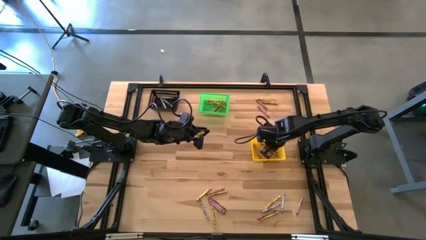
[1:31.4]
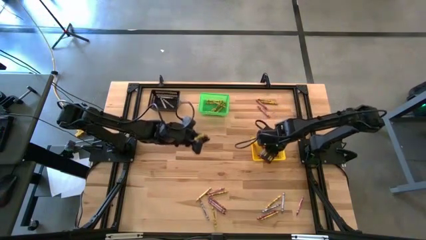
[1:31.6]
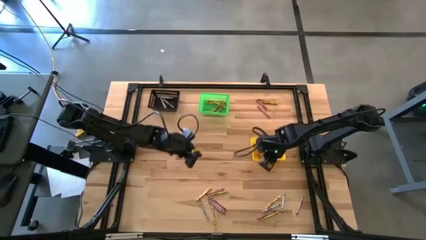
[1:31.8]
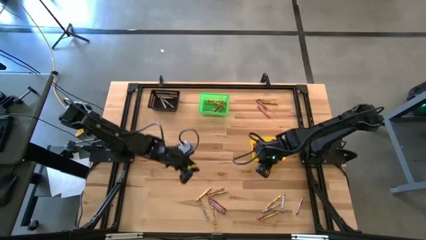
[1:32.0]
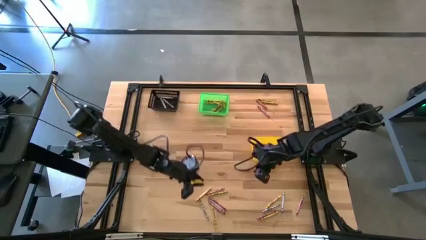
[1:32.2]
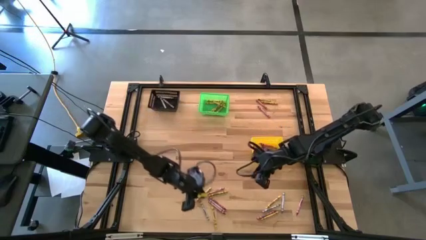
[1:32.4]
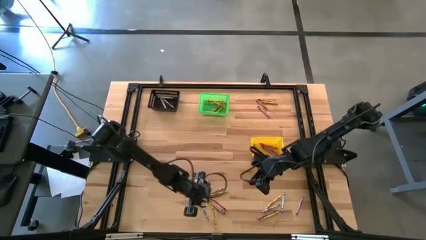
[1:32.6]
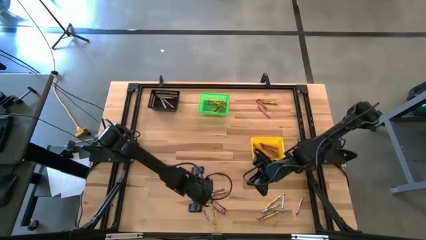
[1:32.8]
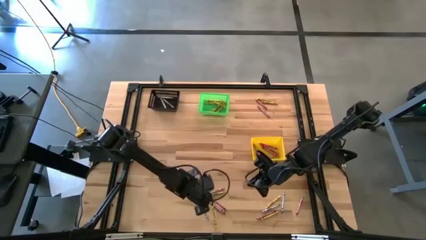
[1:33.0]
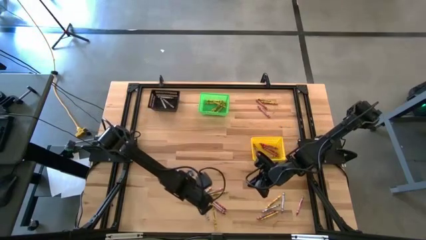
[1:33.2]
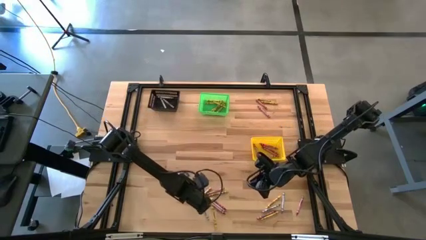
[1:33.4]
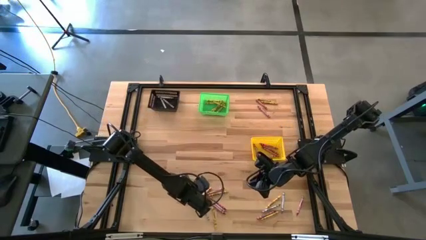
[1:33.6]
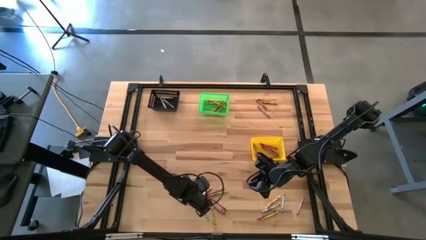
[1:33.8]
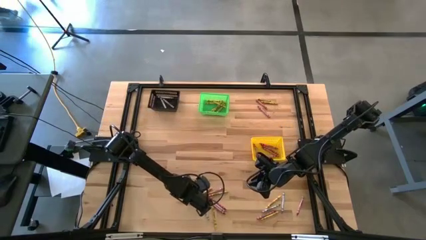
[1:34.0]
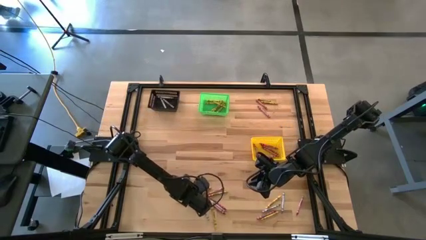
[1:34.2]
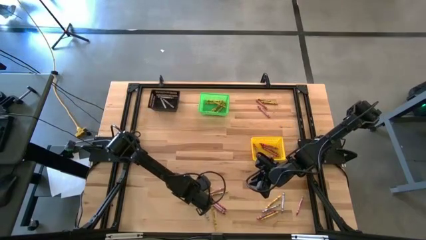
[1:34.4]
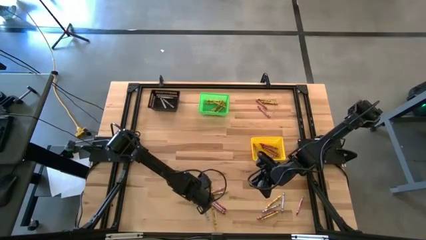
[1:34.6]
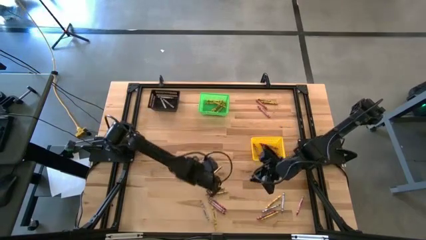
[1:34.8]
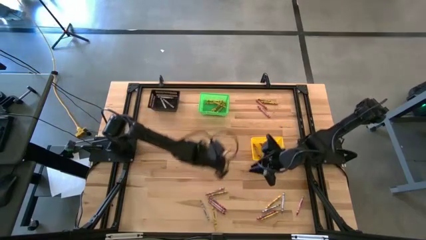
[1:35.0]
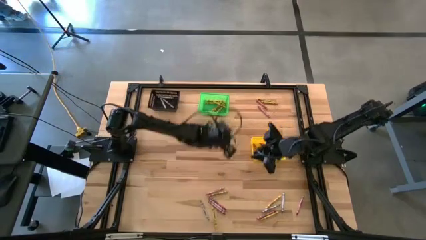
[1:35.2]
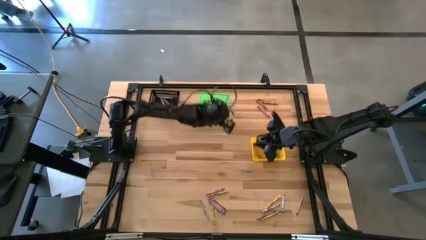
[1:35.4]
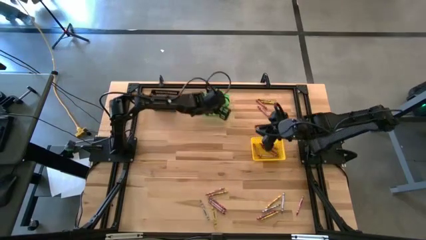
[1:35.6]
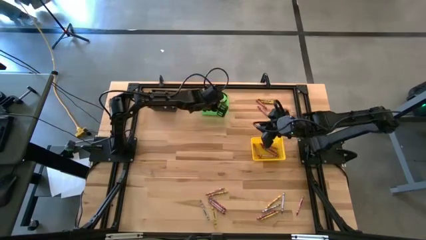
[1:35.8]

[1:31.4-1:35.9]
Task: Sort crayons
Put the yellow crayon into the green basket

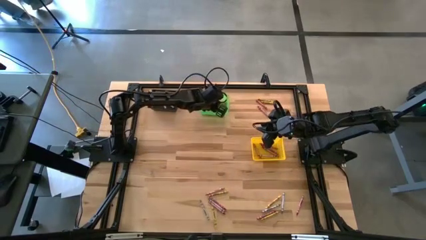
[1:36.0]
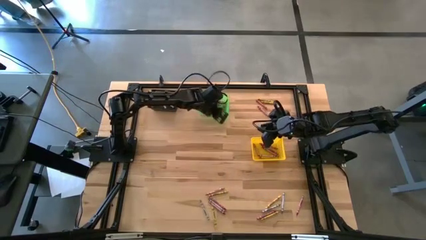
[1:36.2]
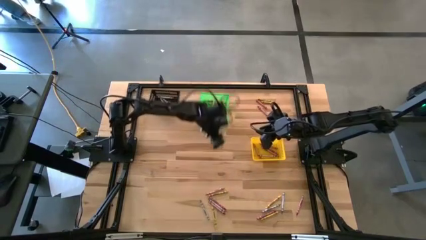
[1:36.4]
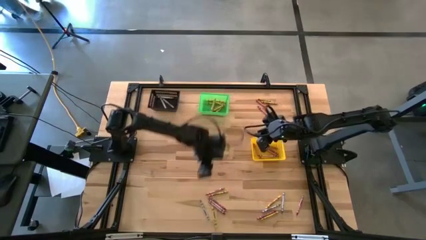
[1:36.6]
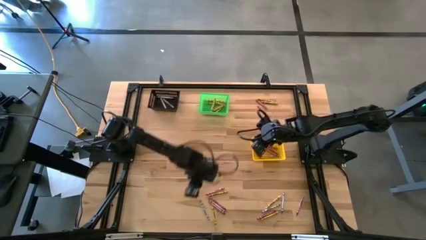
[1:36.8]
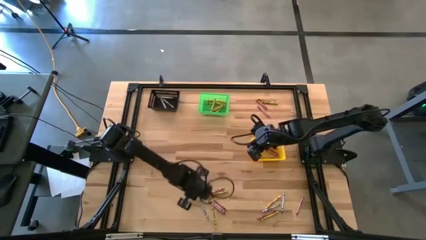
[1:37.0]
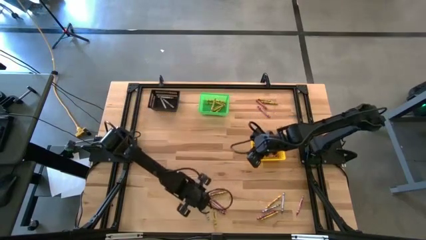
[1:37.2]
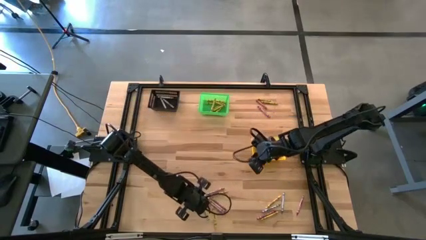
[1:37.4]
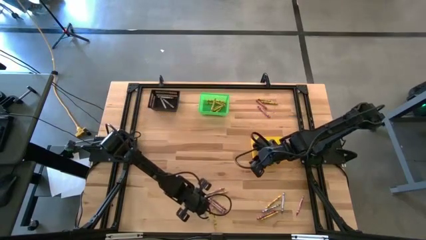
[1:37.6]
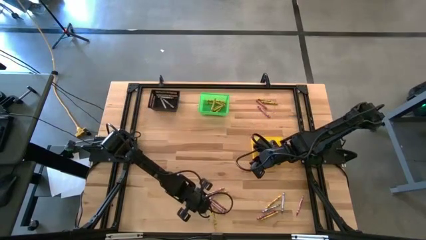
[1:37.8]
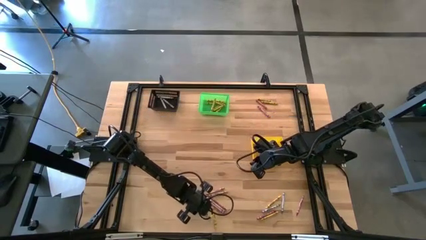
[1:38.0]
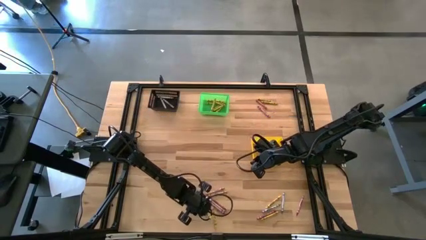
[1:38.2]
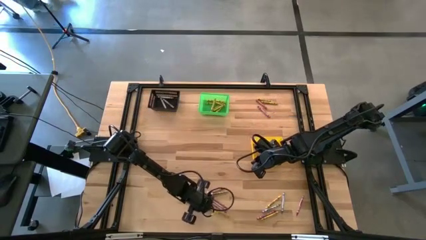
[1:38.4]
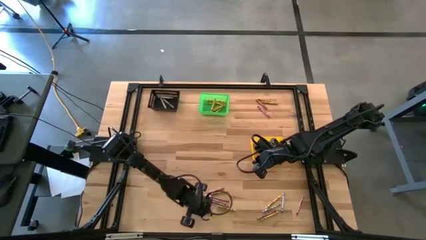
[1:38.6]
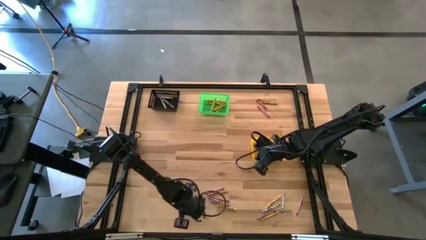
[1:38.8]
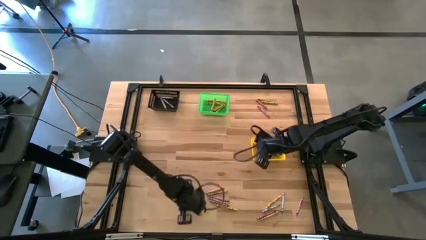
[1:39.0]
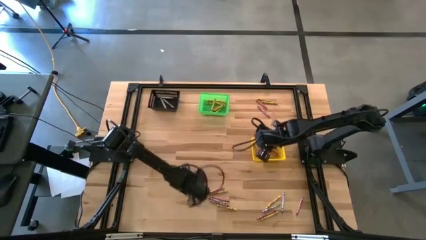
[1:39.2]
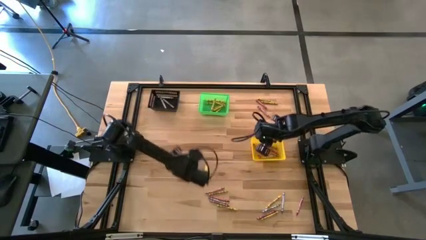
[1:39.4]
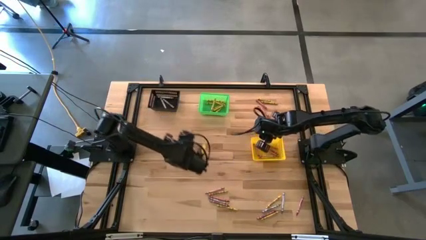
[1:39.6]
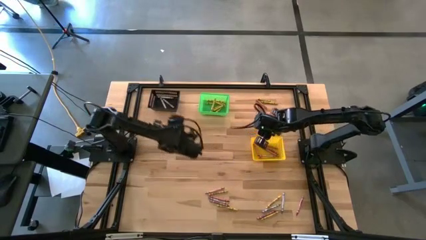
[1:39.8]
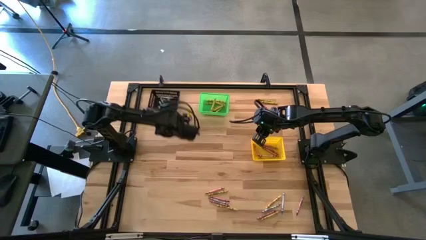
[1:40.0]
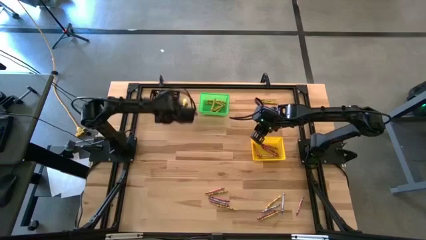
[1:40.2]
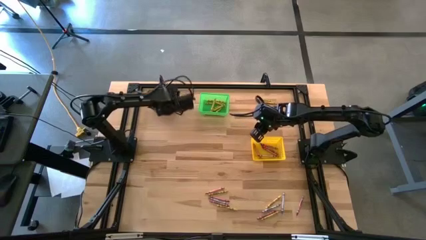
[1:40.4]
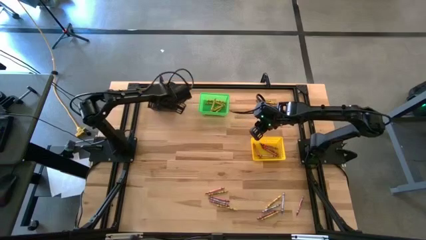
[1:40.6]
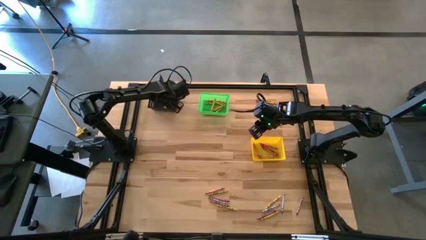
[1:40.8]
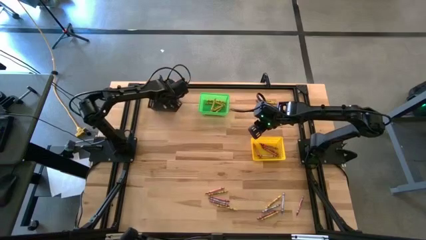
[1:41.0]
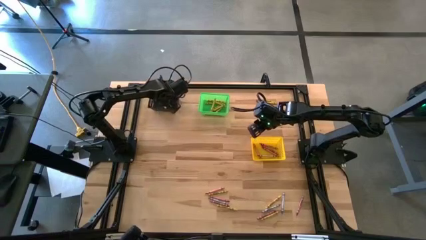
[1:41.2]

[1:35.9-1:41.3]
Put the gray crayon into the black basket

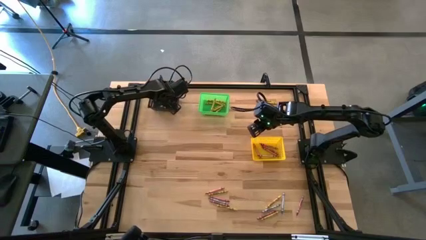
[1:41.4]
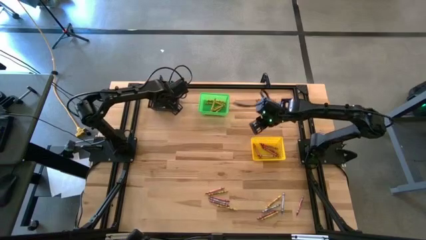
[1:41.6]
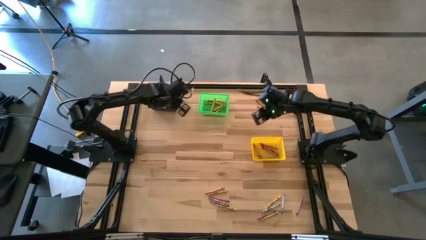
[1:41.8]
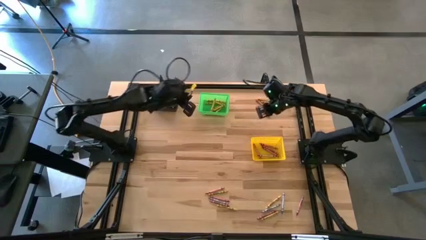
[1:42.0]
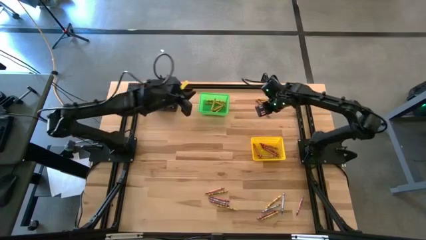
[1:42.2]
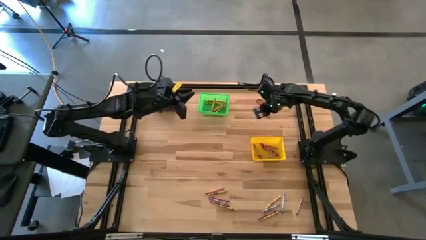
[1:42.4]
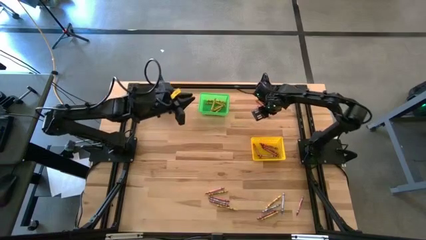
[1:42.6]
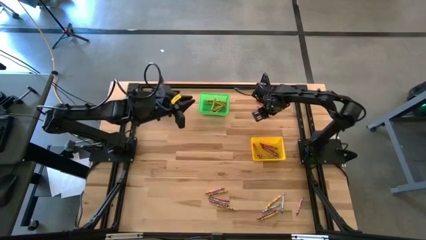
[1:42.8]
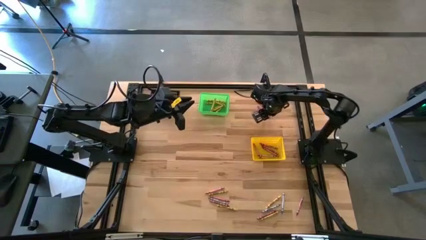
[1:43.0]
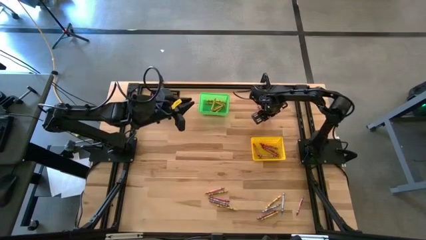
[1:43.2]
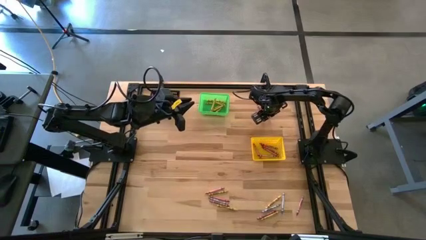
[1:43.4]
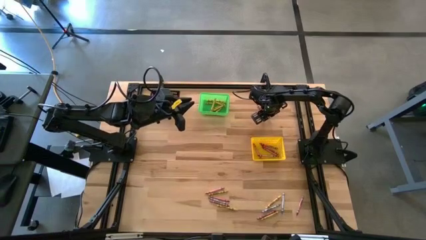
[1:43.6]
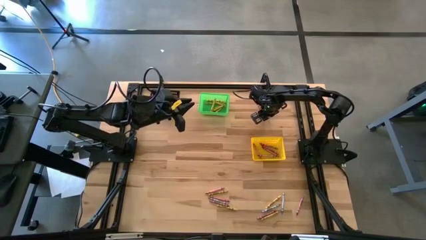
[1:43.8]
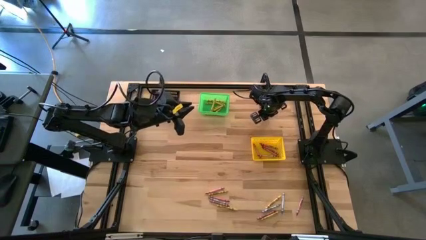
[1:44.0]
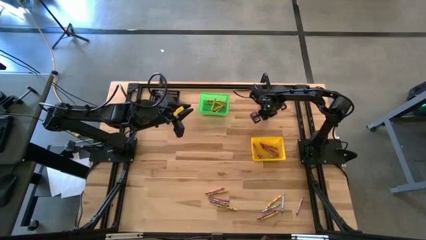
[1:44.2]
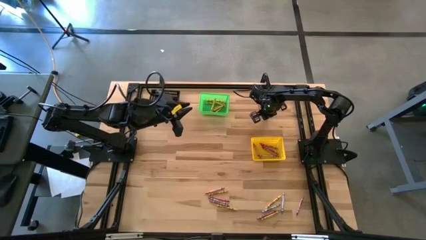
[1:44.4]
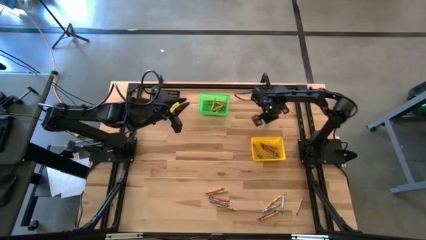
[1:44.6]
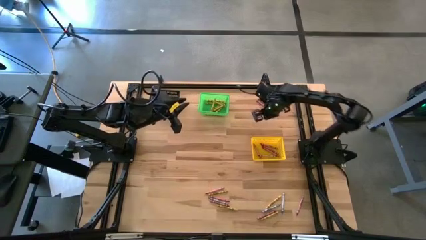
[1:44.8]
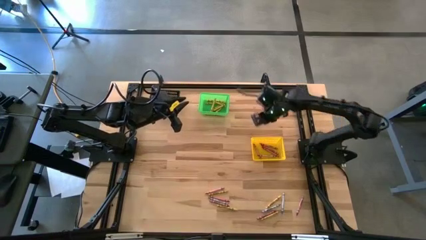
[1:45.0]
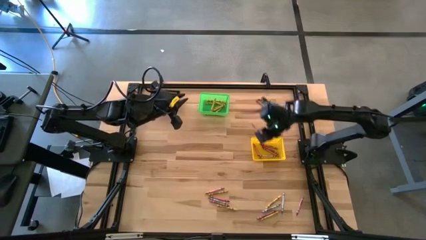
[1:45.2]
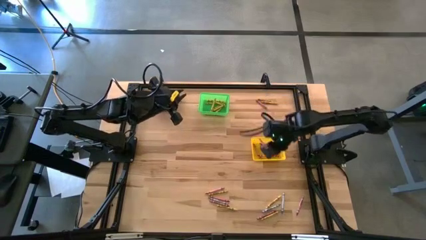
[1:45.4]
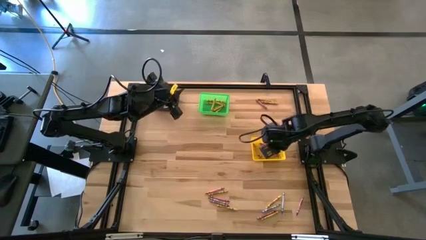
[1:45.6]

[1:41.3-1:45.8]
Put the red crayon into the yellow basket

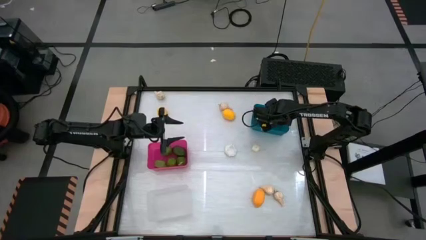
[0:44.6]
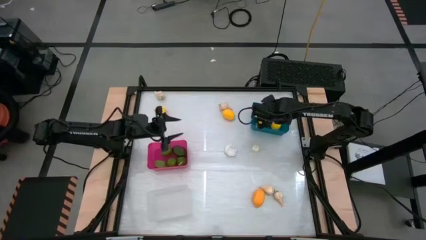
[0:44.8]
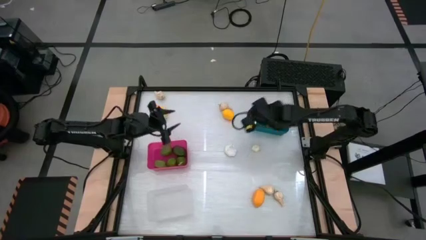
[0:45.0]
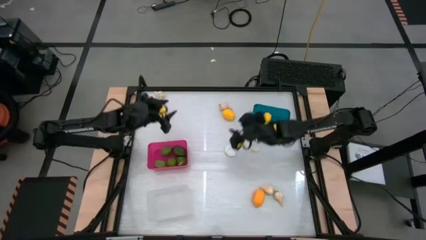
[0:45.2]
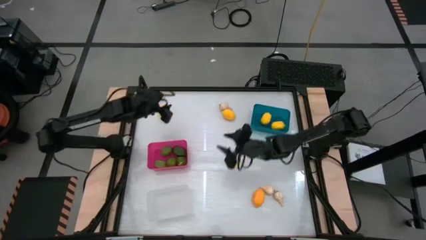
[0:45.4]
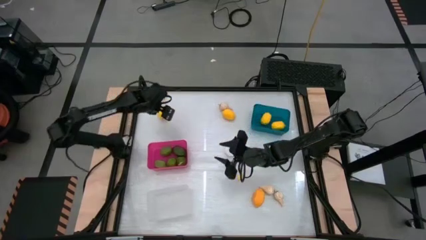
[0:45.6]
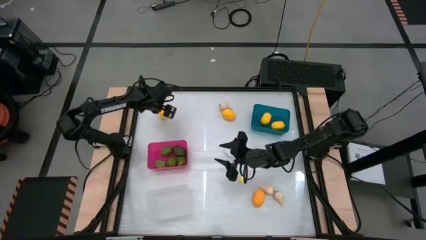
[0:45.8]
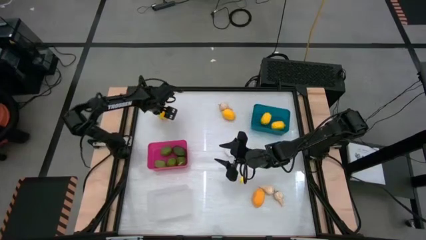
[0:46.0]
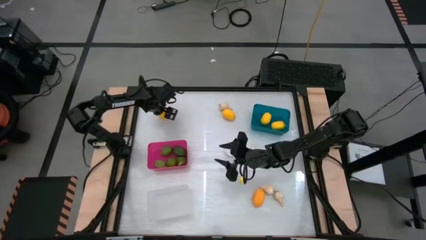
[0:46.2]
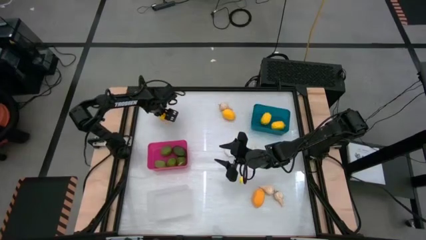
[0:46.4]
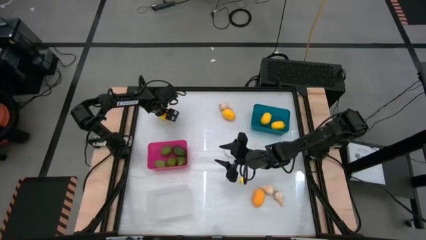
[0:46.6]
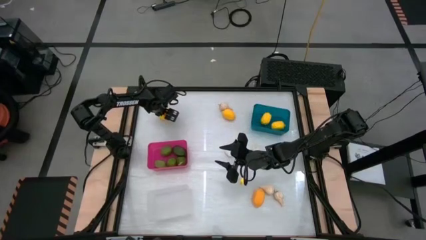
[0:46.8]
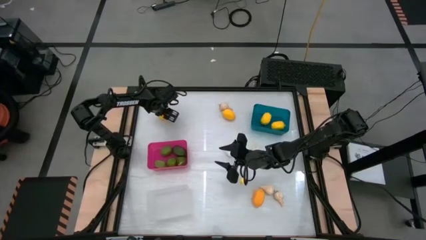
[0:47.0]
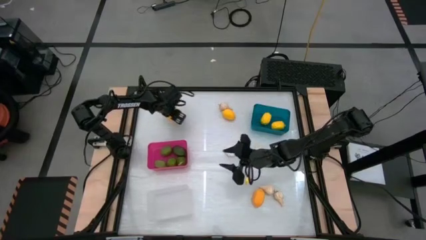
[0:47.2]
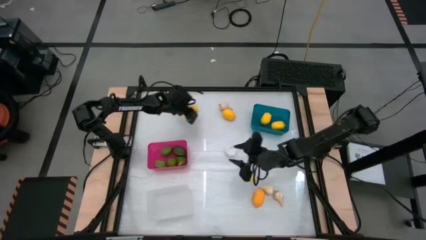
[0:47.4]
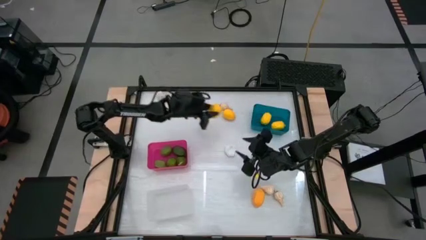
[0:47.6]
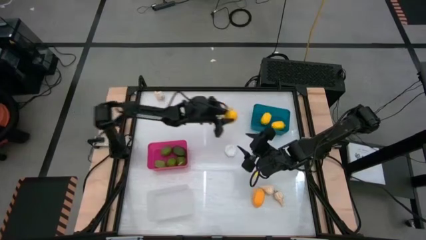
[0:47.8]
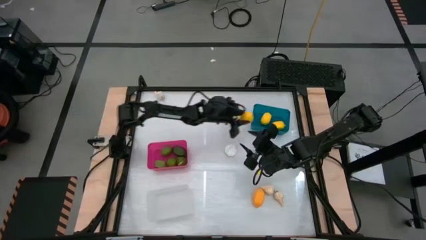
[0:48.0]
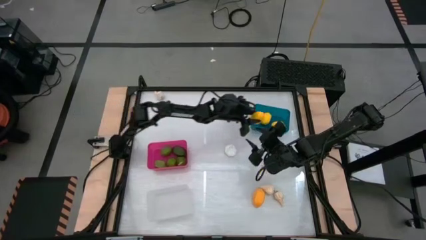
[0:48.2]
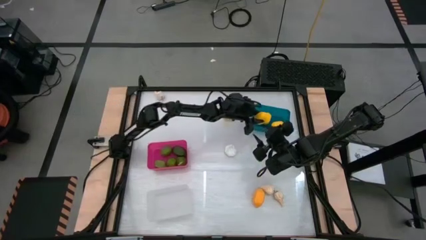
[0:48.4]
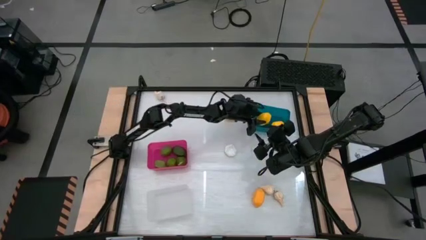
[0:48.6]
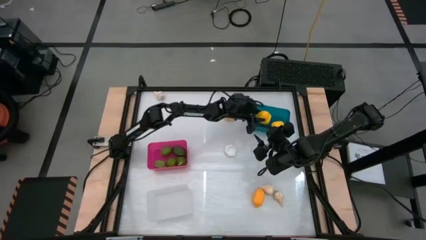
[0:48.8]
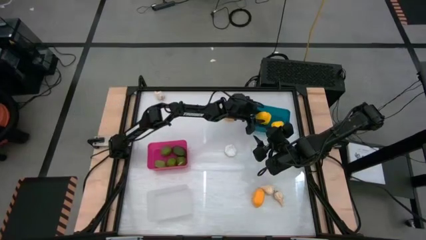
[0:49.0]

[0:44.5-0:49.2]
Task: Sort produce into baskets
Put the lemon into the blue bin
